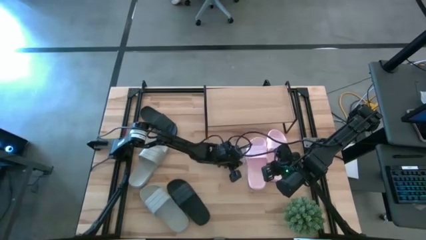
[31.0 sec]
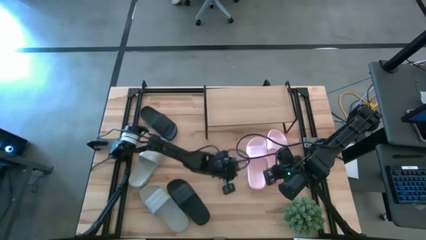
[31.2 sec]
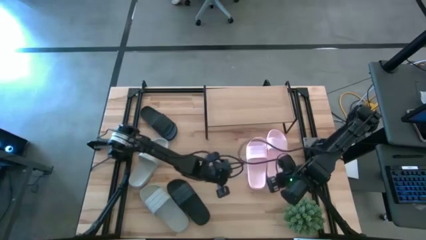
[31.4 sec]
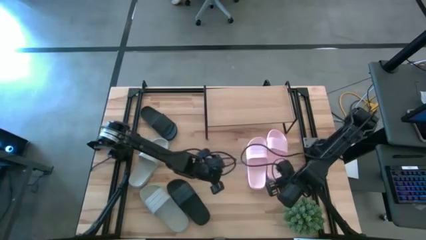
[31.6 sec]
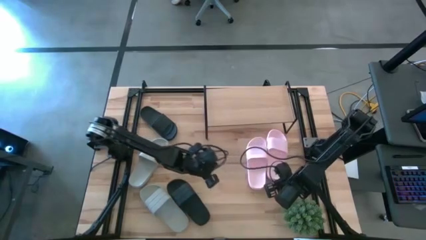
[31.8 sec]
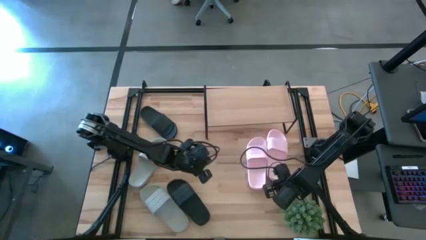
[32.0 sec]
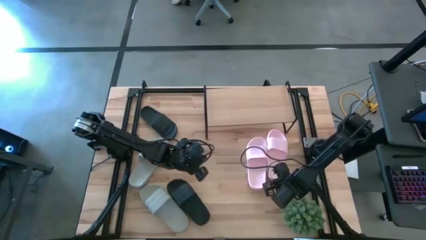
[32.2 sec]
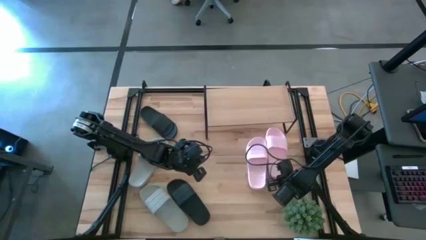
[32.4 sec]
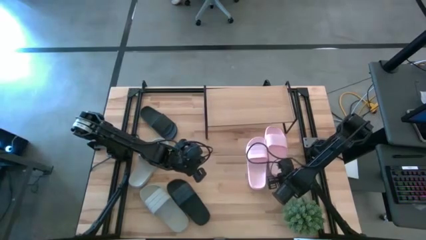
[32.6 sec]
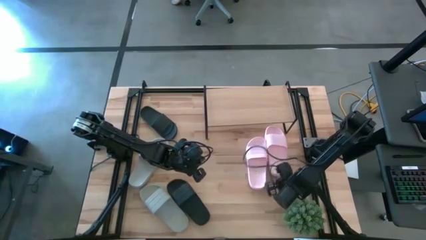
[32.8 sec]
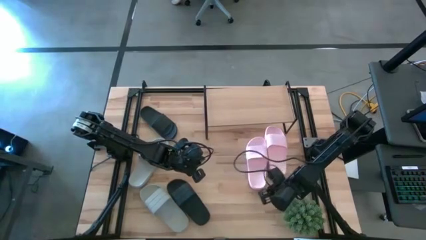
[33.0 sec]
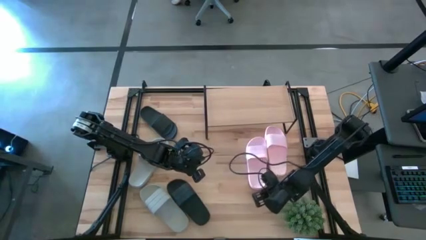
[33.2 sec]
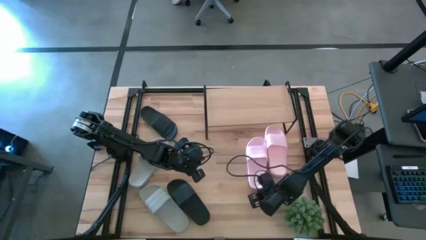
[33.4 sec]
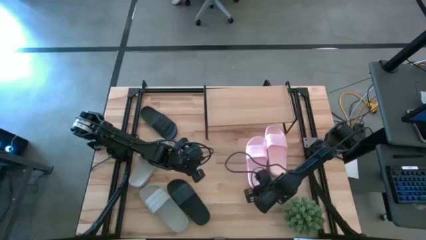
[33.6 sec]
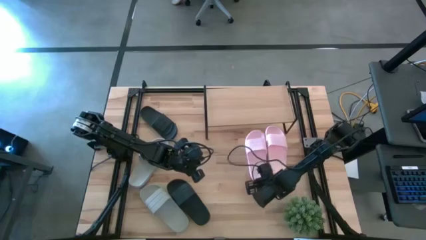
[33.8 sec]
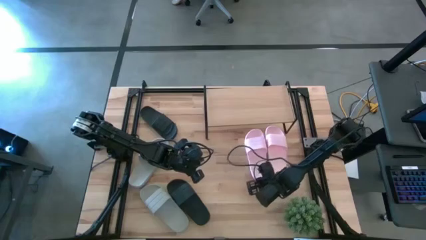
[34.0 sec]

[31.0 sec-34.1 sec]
Task: Pick and place slides into the shelf
Adjust the pink slides on the table

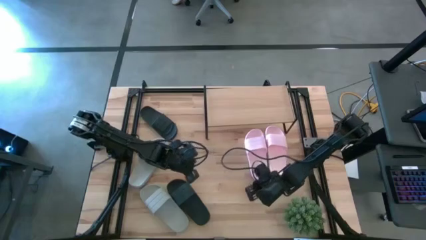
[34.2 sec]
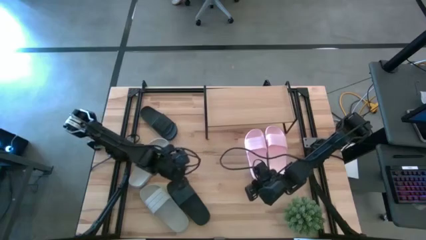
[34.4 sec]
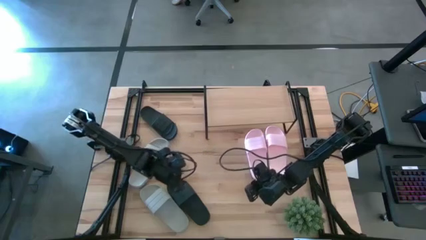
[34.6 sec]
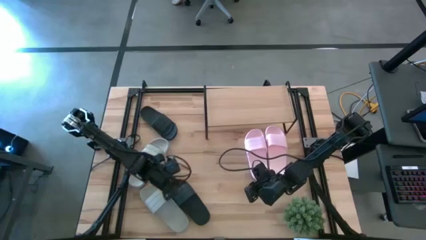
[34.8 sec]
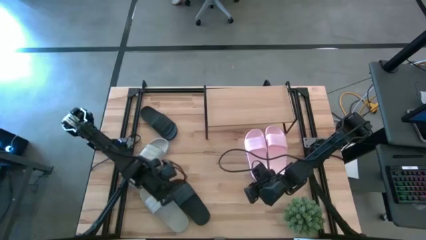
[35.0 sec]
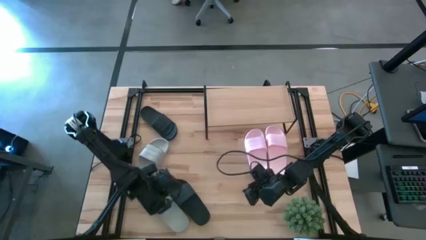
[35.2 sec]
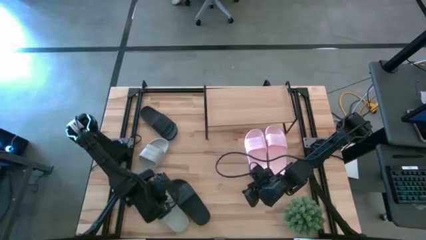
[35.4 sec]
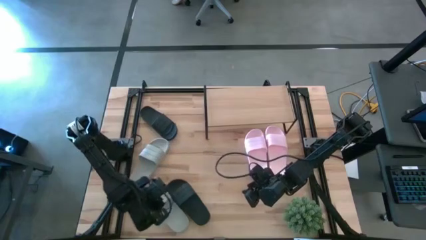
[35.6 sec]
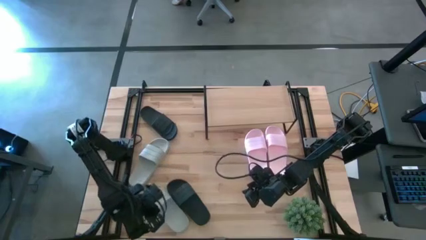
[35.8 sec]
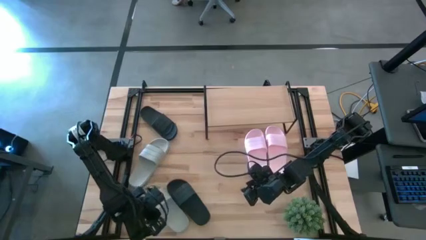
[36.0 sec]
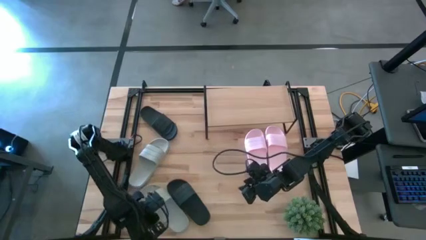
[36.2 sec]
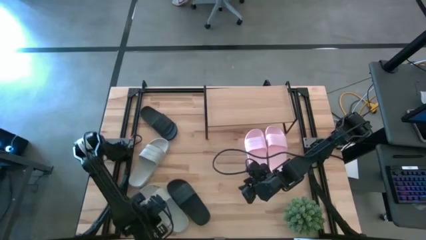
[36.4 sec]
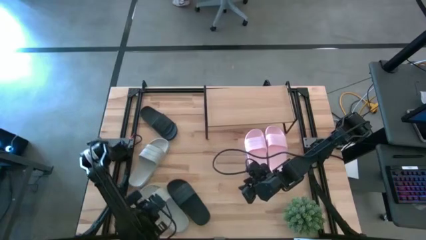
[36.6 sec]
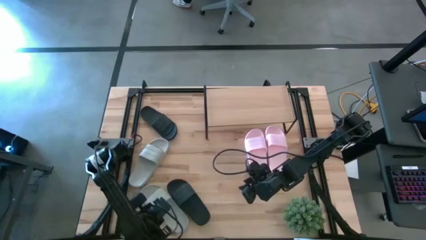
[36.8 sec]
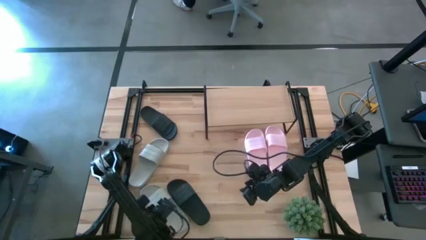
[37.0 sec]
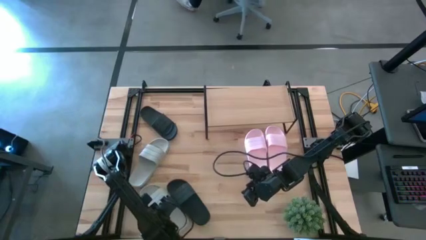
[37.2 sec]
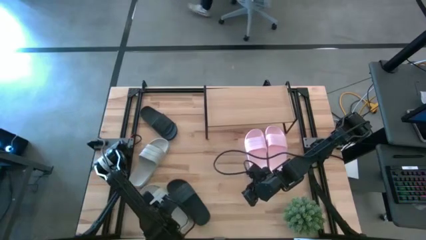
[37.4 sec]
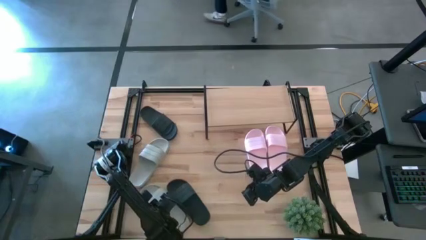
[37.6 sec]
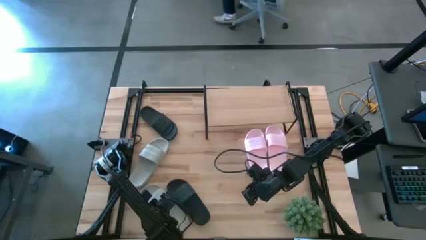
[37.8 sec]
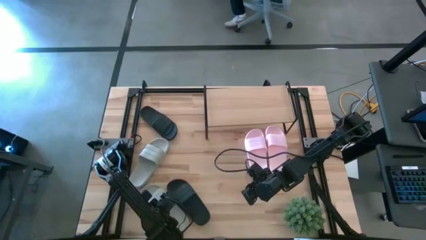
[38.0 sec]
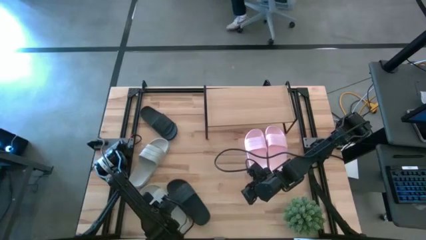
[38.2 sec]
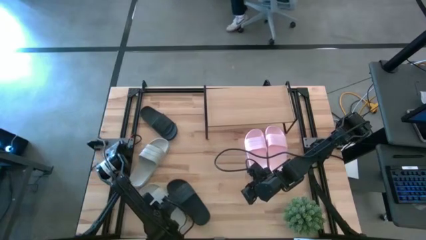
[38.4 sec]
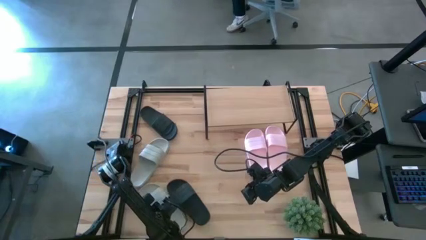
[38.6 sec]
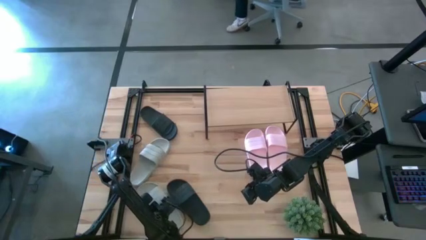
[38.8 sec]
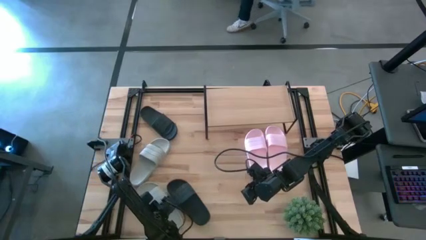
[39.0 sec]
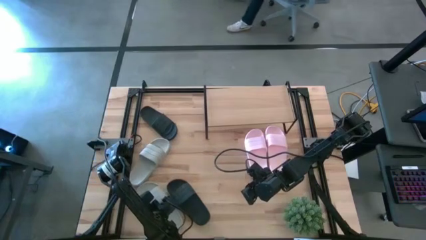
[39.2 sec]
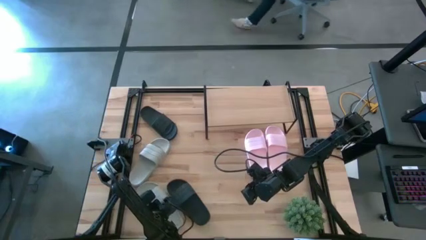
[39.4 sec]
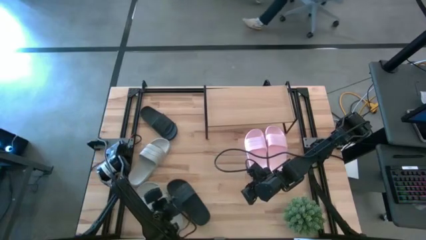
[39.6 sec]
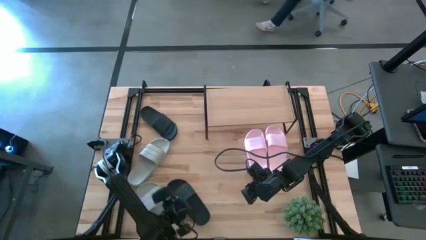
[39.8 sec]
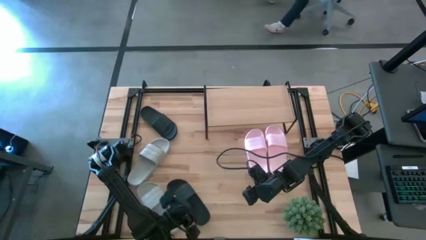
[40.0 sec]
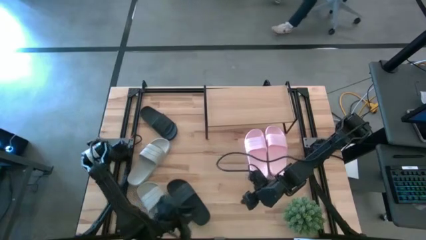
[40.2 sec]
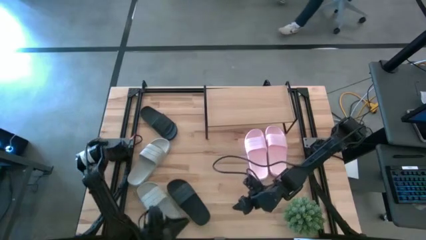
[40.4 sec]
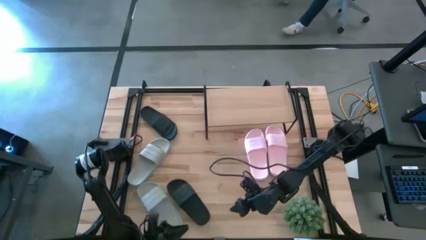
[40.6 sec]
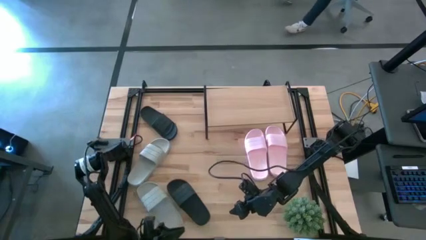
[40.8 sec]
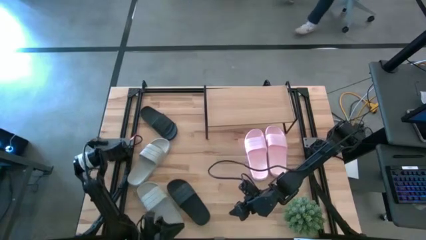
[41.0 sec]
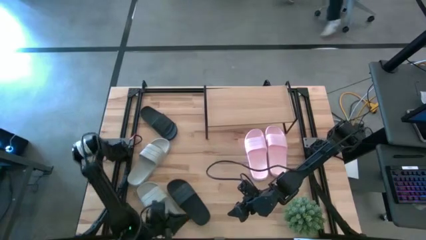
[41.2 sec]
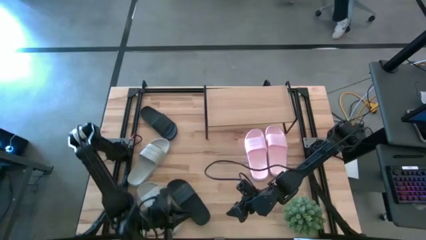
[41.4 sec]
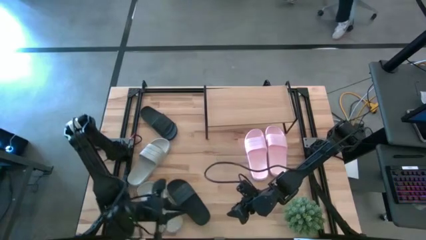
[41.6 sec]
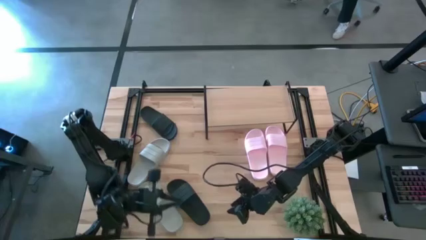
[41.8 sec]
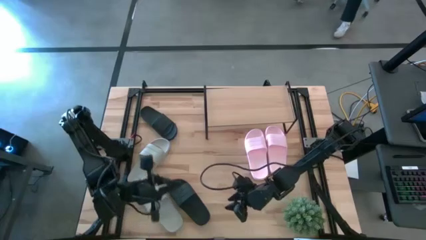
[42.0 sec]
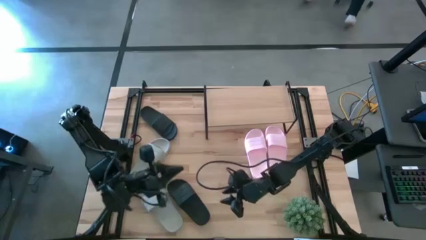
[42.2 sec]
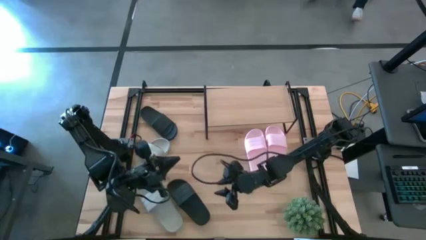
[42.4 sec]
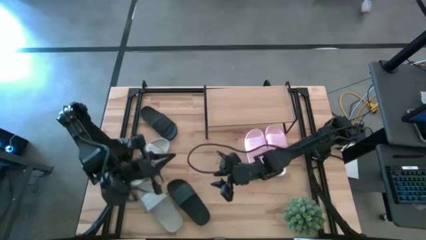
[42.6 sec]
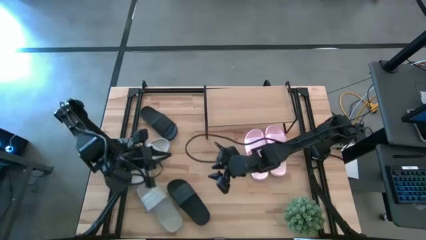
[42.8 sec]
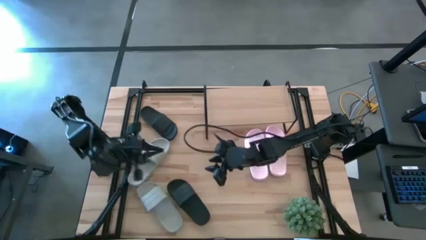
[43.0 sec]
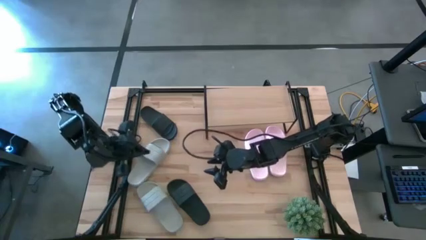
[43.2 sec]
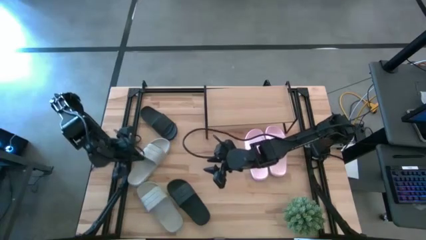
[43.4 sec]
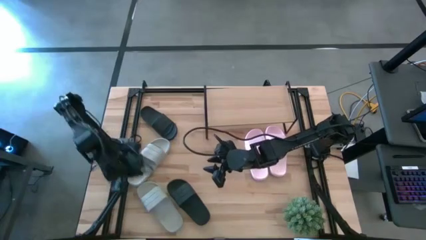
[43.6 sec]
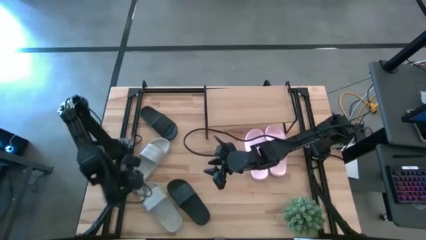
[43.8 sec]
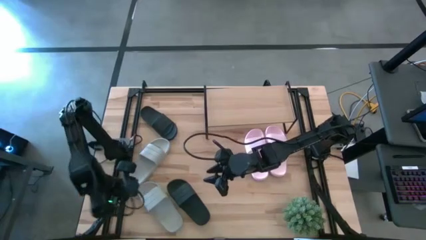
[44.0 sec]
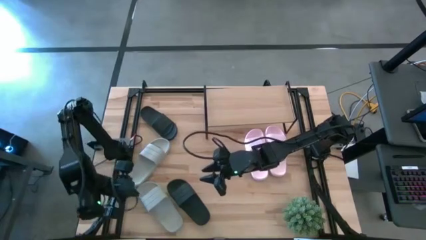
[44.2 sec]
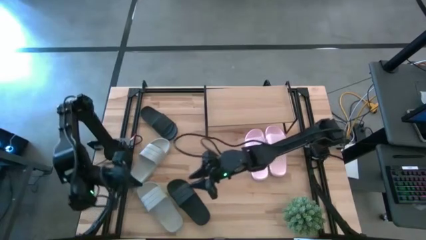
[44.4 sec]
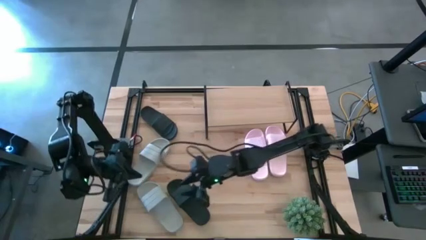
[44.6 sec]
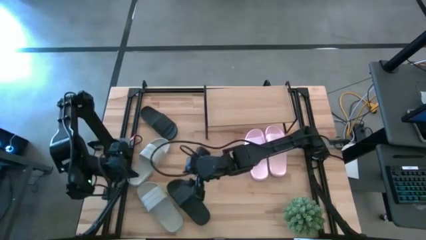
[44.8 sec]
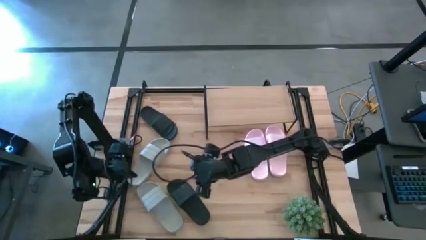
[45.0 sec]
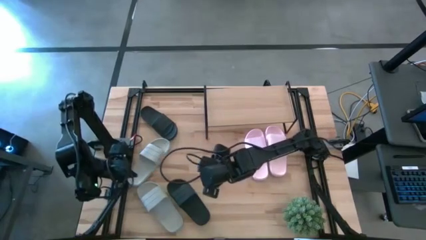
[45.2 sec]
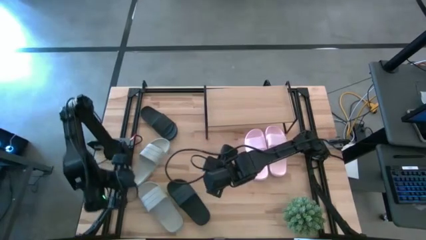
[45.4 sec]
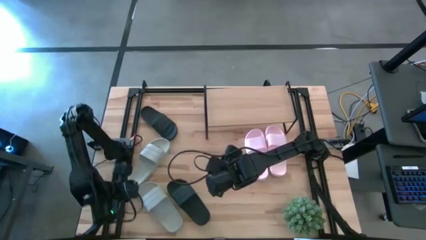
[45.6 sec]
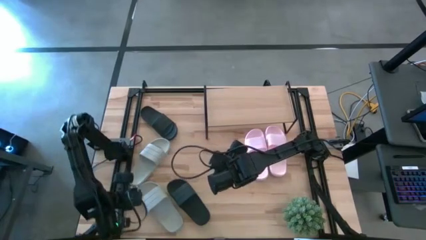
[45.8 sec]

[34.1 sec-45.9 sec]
Put the bottom gray slide on the shelf
